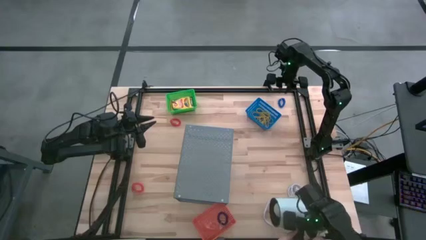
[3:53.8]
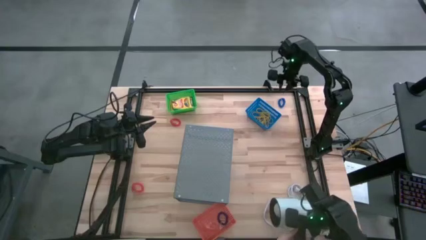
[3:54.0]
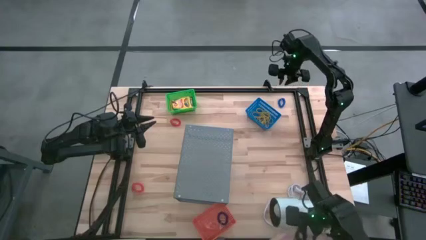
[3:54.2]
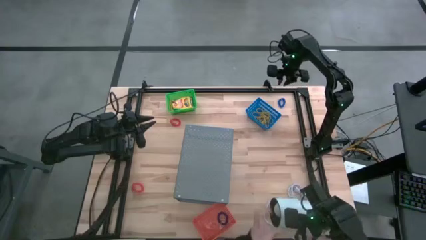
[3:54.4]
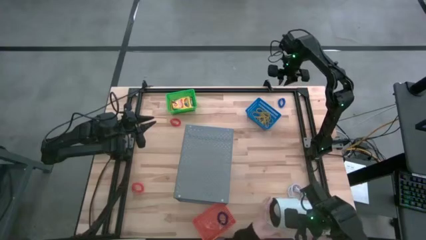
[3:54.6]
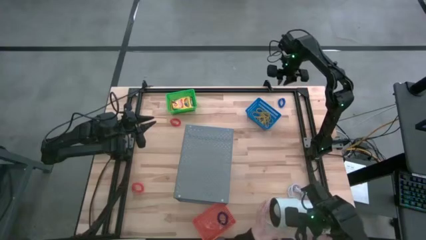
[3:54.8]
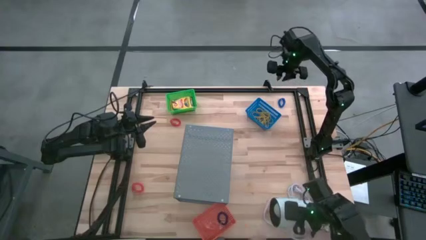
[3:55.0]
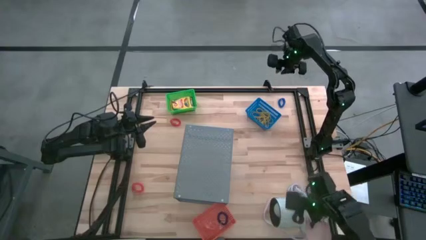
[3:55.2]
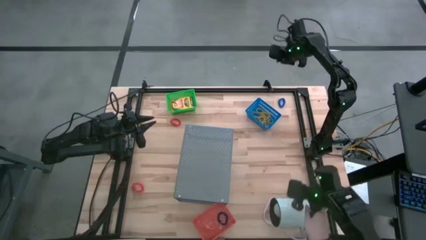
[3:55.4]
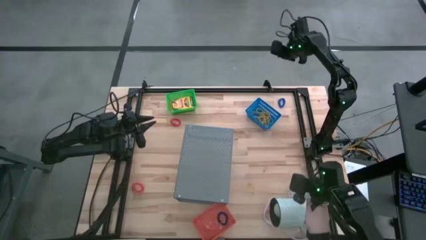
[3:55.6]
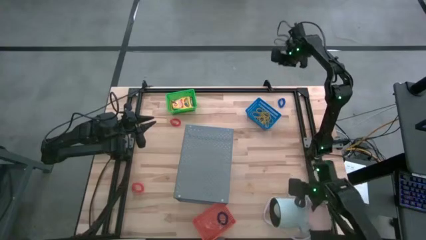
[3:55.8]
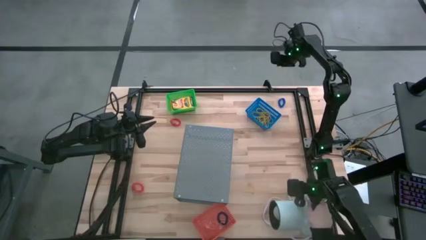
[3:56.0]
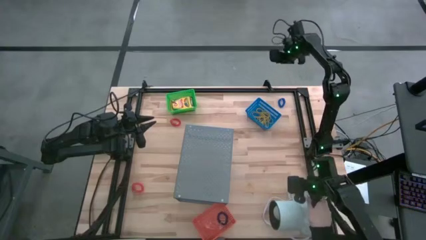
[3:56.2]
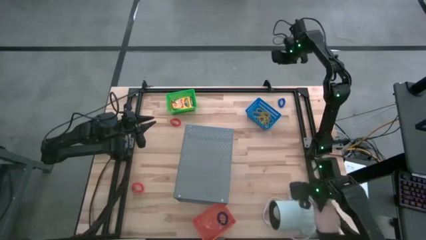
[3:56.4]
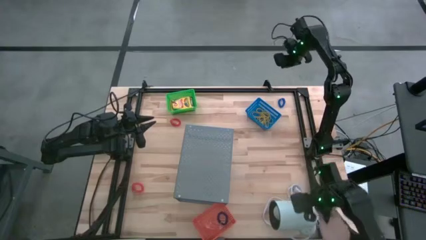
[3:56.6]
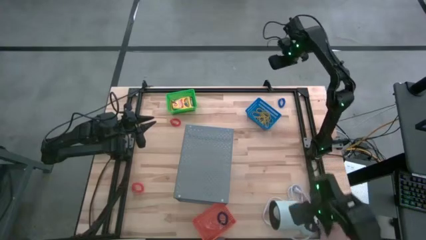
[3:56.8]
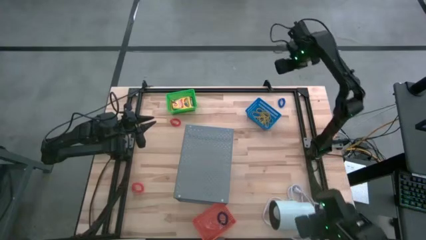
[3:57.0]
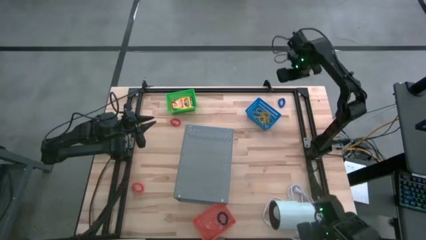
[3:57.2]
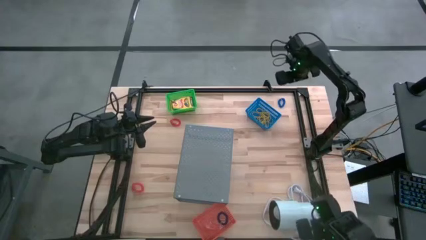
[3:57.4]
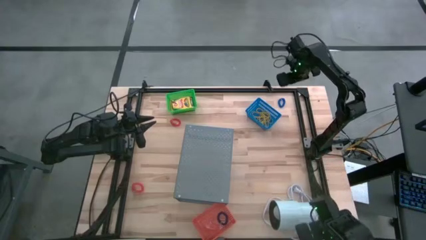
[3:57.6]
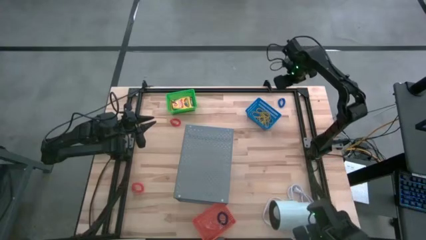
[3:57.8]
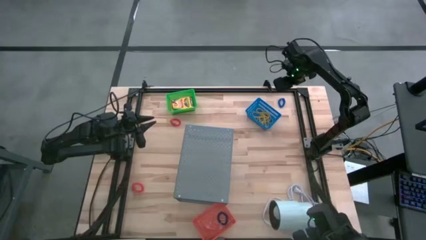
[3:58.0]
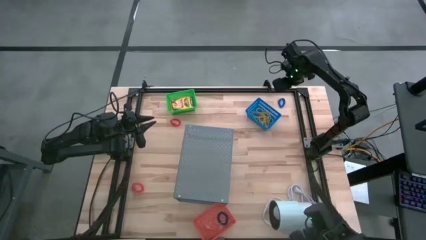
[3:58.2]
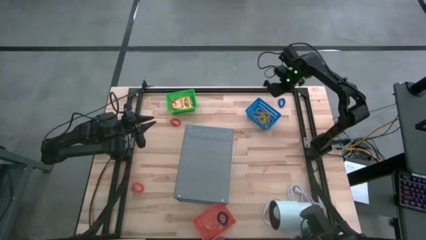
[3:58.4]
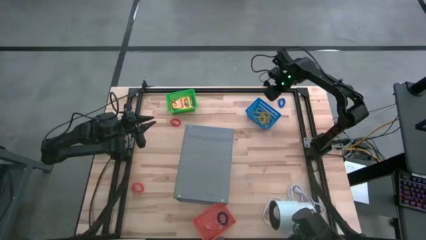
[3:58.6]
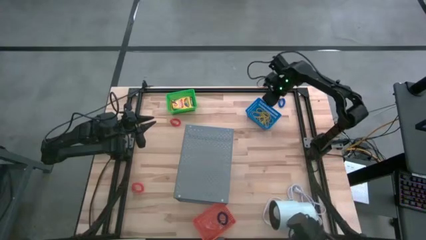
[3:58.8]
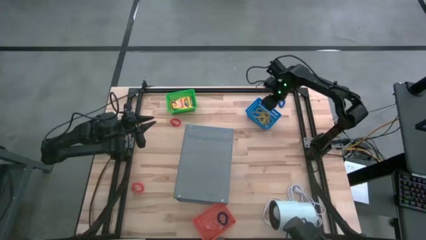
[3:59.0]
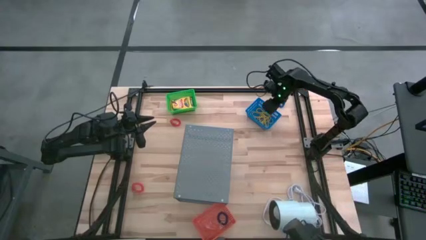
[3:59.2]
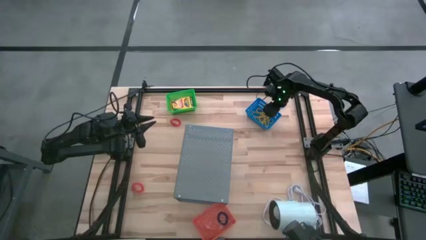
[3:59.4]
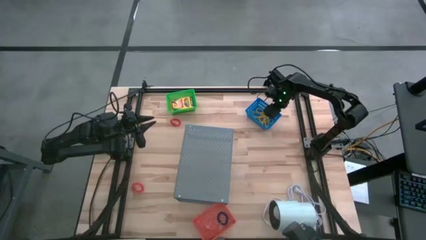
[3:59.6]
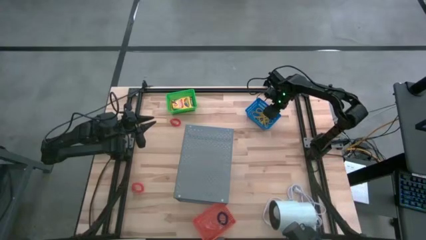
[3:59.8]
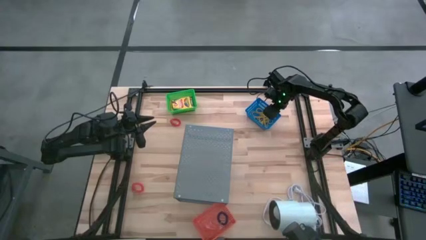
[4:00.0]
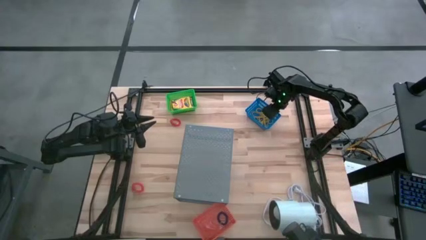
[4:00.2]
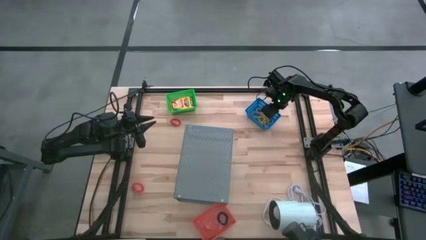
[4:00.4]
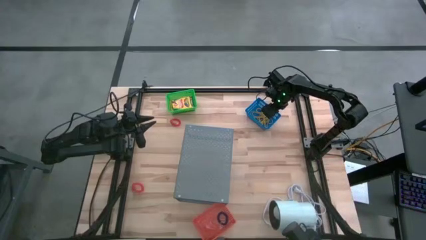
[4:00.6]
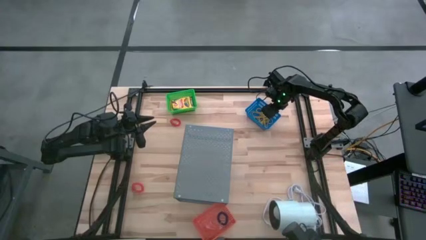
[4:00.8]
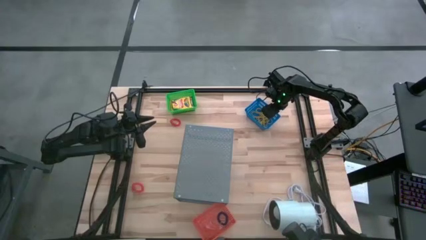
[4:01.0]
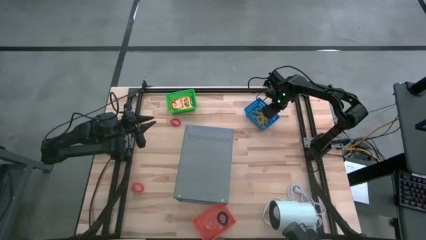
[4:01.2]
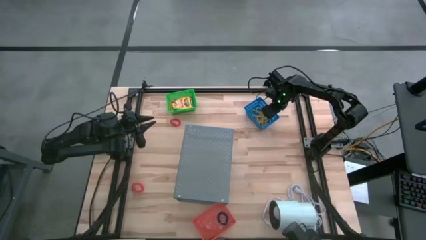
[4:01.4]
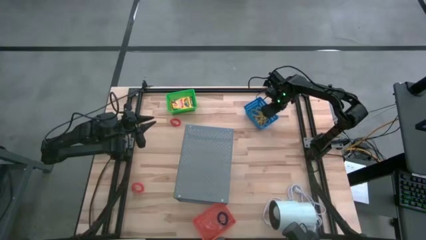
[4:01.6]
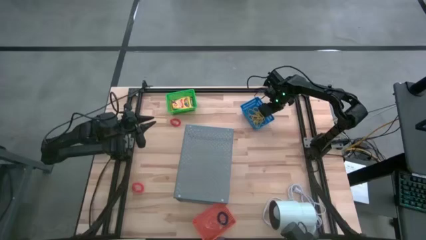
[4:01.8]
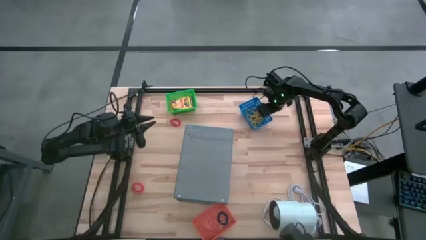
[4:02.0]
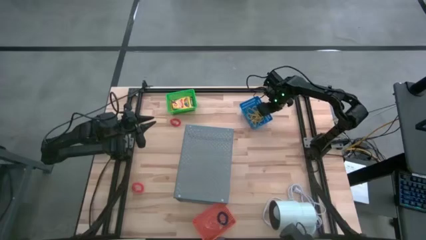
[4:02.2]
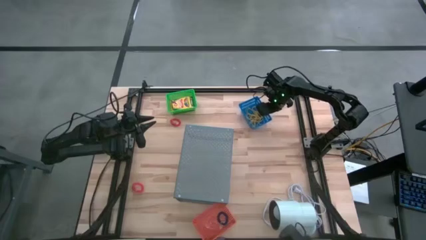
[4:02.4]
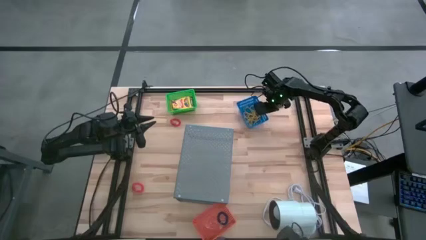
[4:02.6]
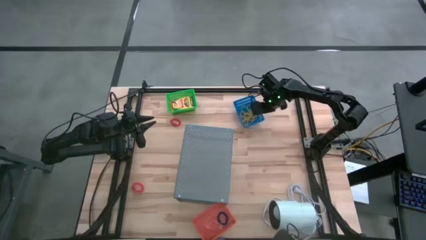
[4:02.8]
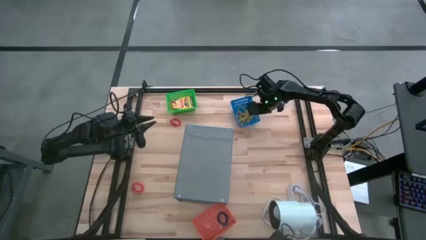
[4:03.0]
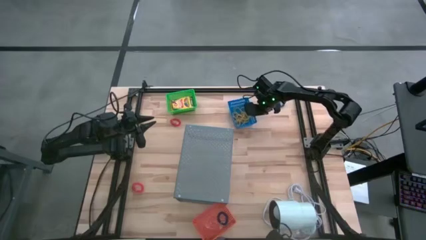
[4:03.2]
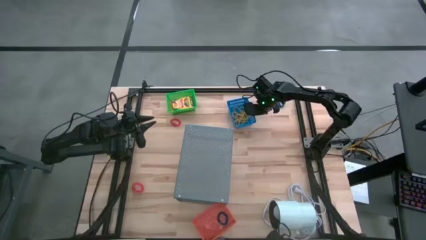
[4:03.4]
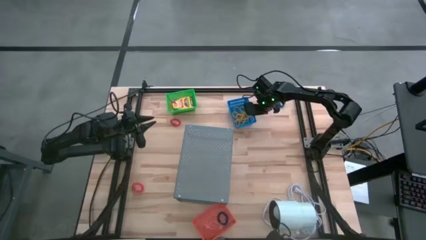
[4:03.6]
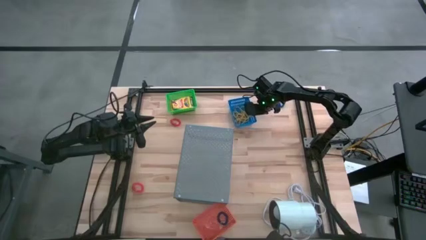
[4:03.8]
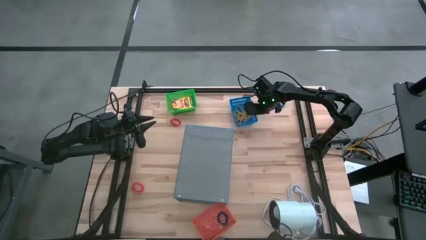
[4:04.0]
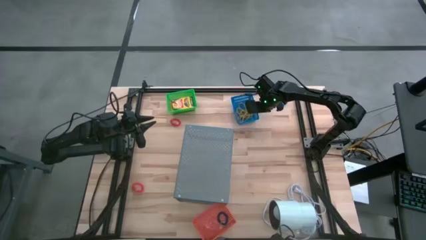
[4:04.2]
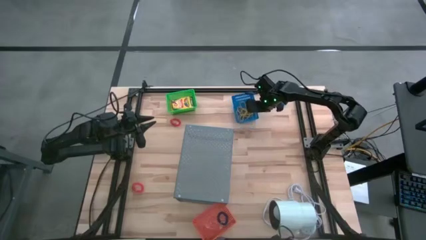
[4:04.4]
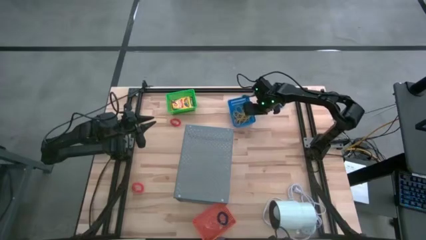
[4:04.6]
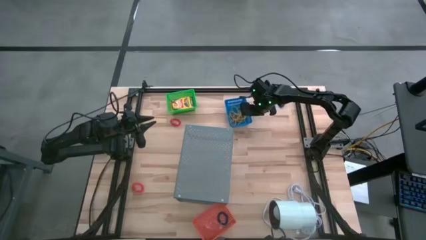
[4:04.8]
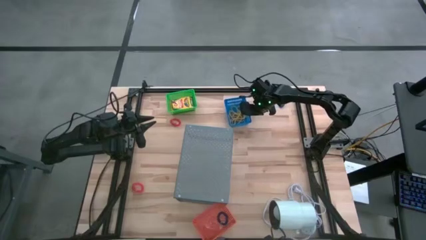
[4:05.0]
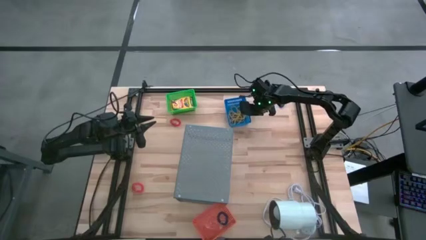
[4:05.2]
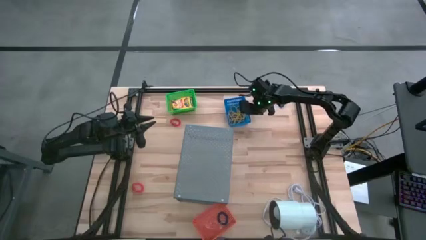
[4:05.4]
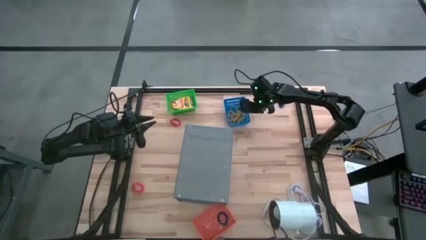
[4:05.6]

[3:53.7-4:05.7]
Task: Pick & Place Office Desk Supplies
Adjust the blue basket on the table

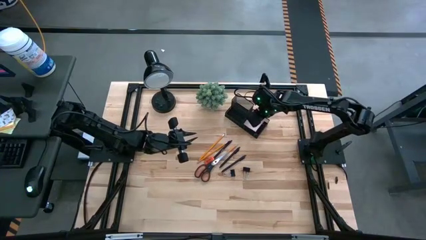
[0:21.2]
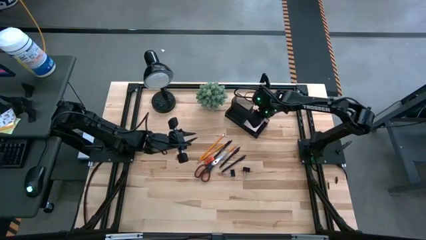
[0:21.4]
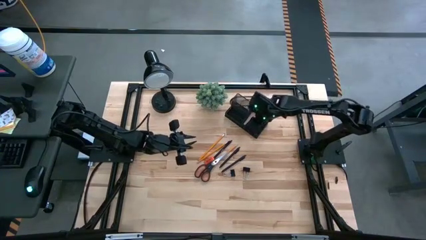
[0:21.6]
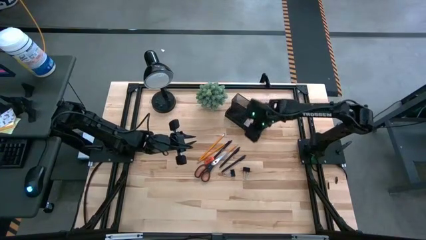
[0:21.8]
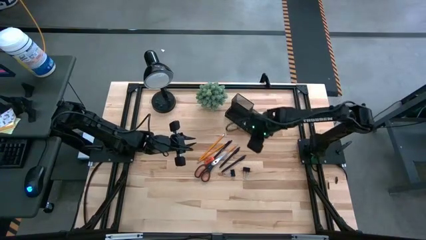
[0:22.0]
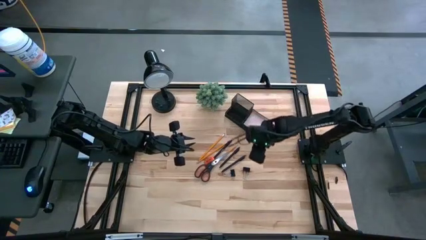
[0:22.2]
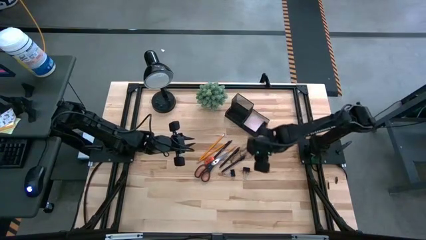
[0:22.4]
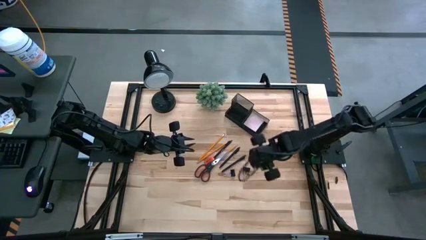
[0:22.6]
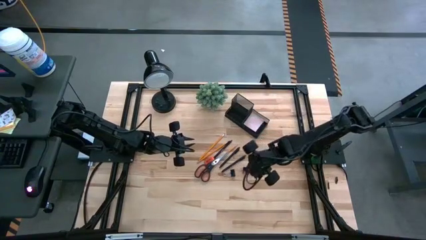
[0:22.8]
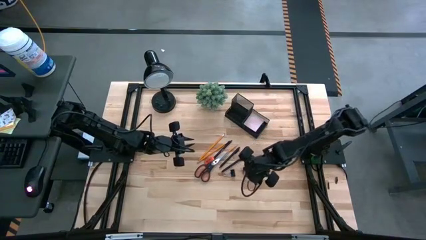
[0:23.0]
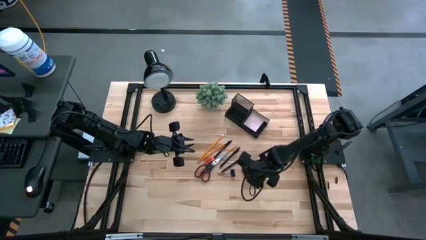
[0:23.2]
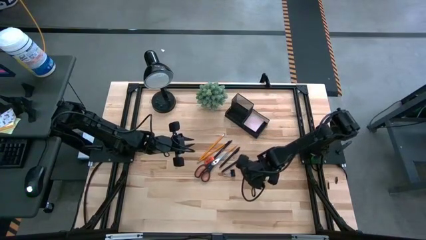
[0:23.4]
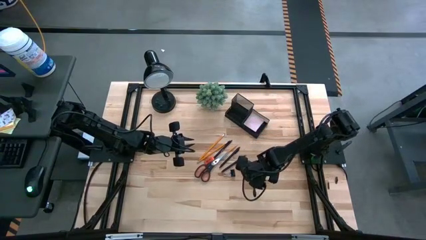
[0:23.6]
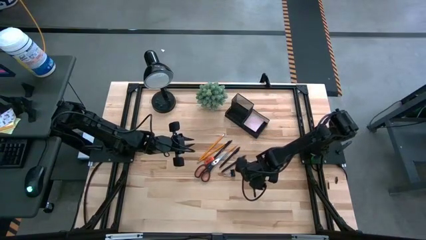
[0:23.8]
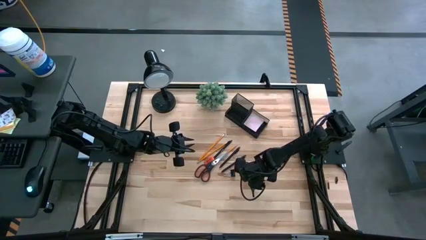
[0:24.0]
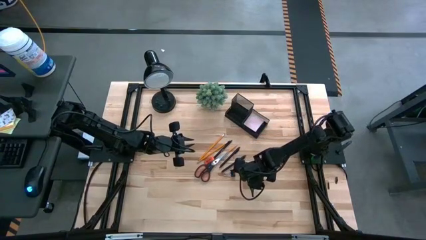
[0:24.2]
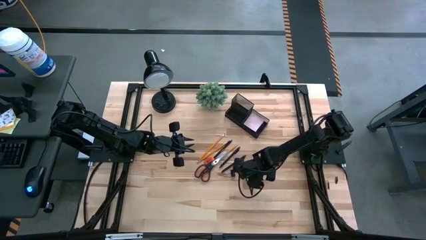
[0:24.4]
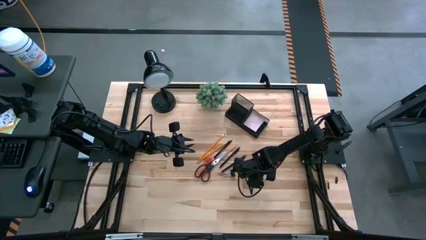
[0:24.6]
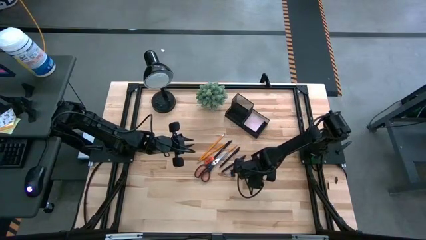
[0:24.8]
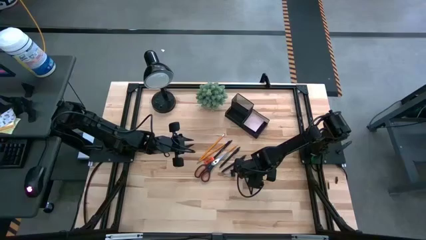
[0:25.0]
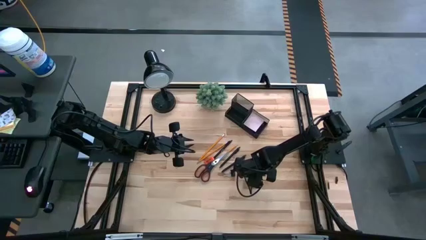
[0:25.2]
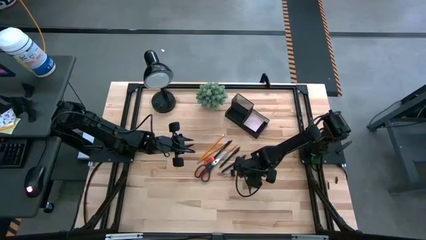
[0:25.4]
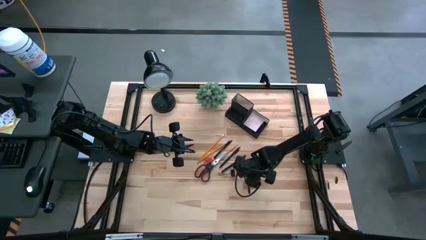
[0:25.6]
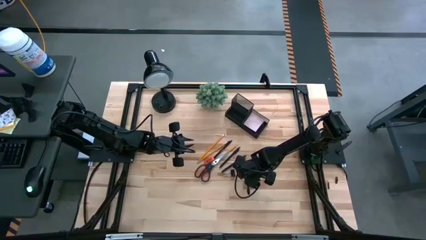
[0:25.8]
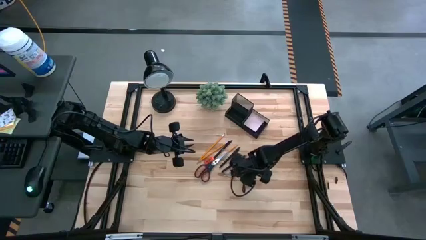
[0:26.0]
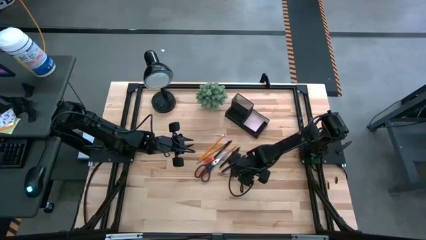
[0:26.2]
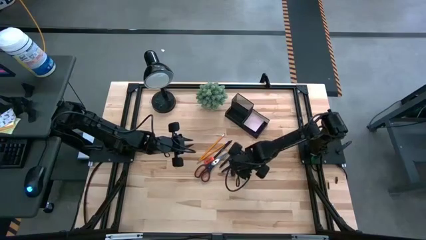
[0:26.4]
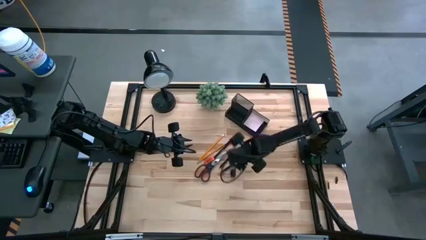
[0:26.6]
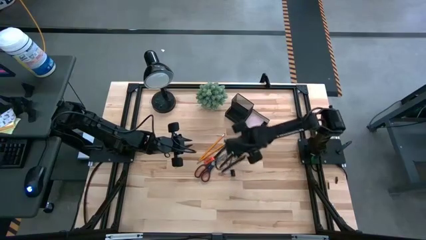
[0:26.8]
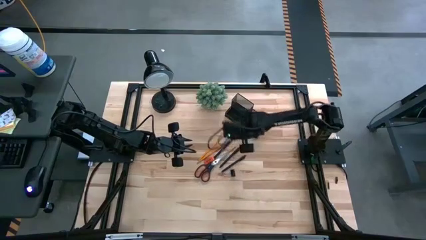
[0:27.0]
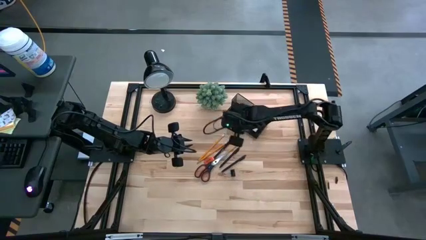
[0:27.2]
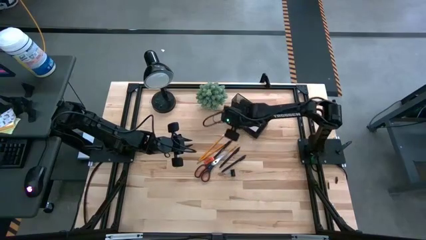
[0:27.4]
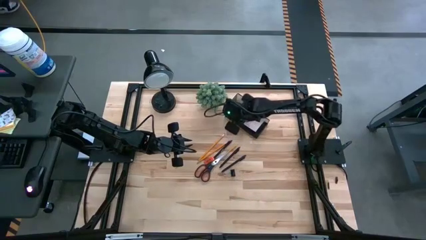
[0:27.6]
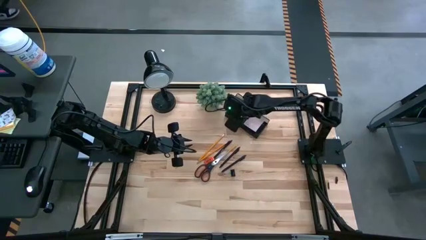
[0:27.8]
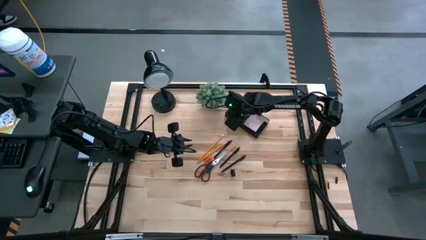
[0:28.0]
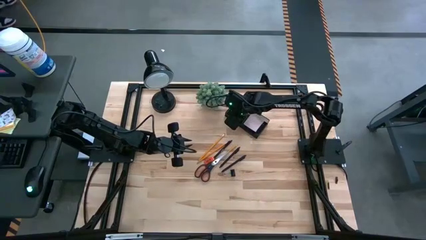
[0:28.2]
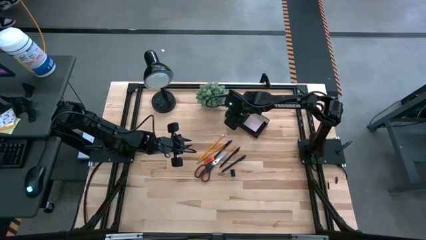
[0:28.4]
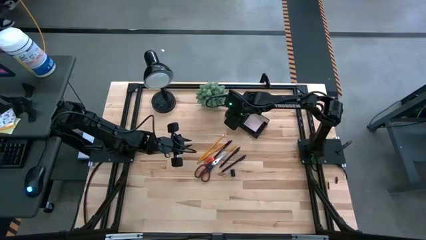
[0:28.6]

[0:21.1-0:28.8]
Task: Pick and place office supplies into organizer
Put the right black binder clip into the black desk organizer
